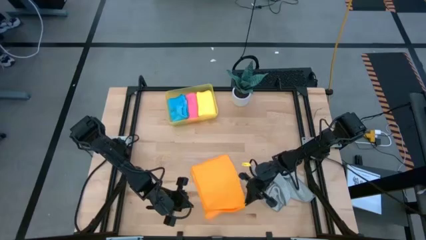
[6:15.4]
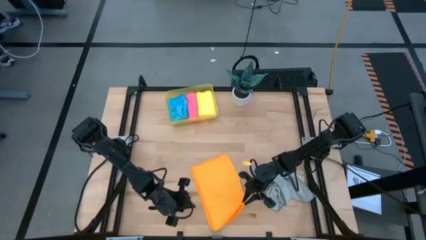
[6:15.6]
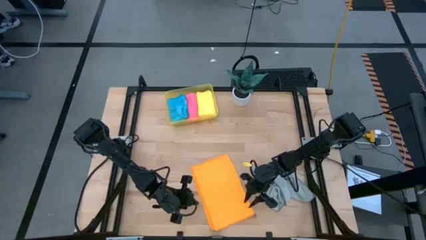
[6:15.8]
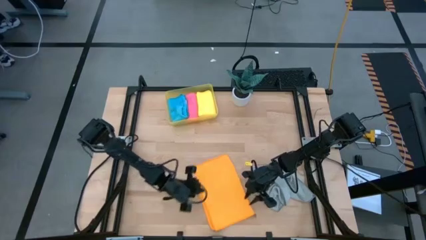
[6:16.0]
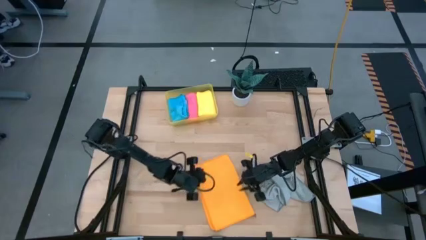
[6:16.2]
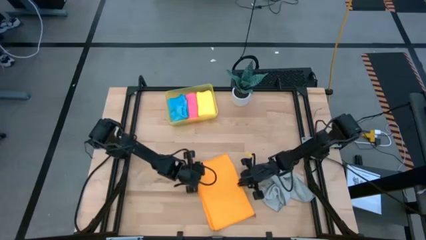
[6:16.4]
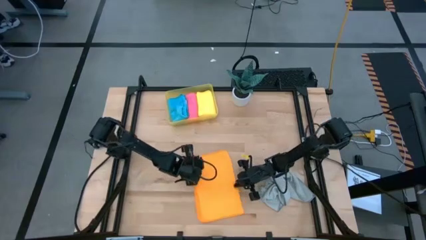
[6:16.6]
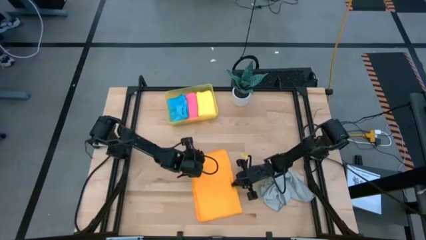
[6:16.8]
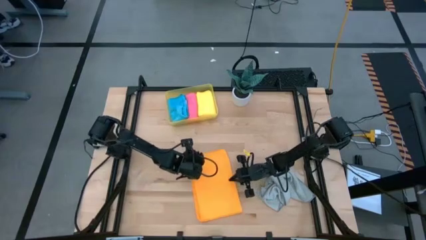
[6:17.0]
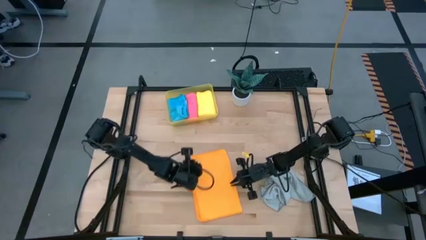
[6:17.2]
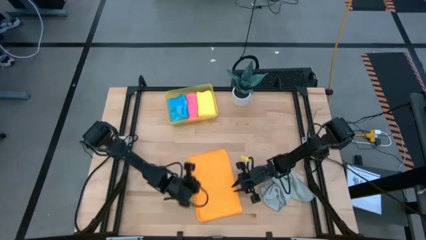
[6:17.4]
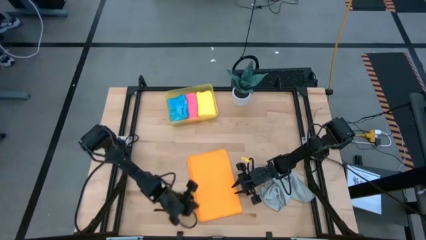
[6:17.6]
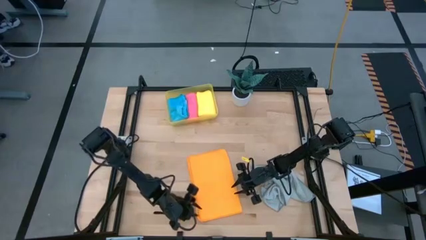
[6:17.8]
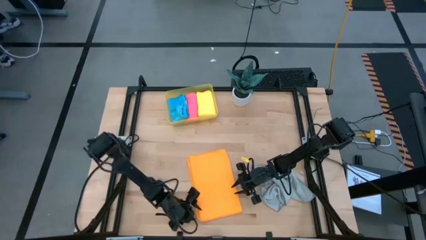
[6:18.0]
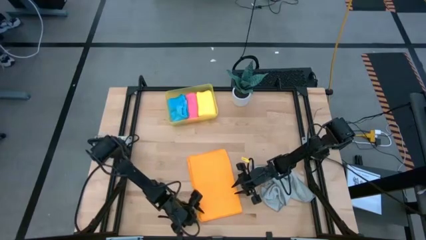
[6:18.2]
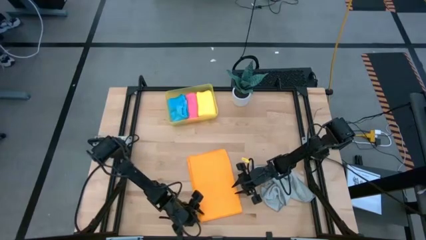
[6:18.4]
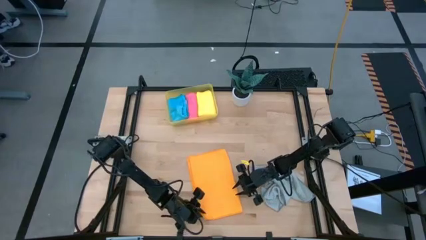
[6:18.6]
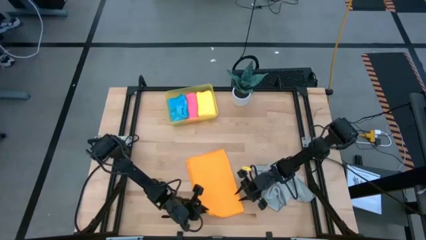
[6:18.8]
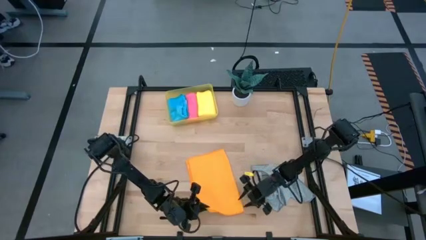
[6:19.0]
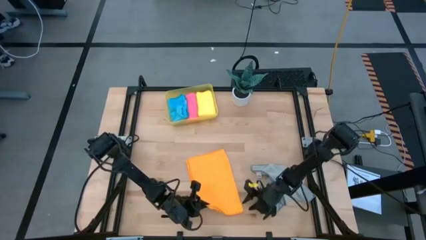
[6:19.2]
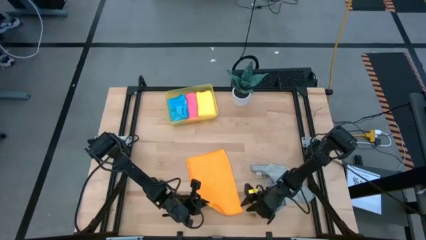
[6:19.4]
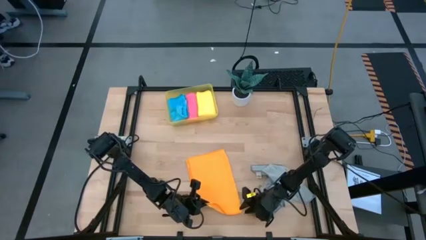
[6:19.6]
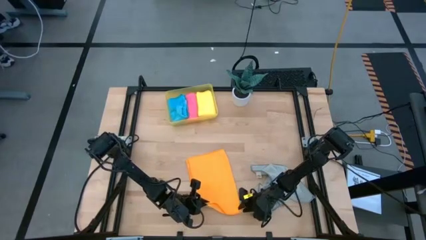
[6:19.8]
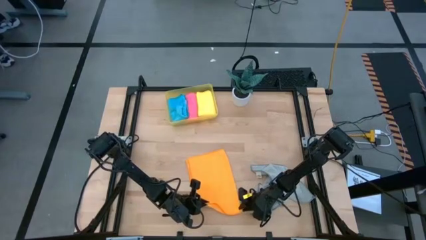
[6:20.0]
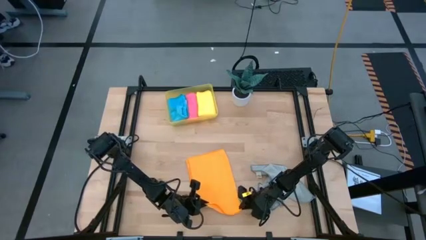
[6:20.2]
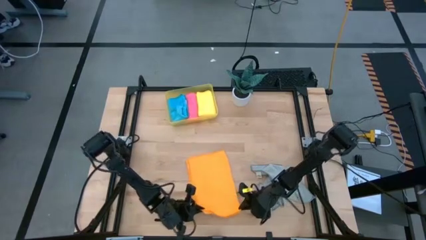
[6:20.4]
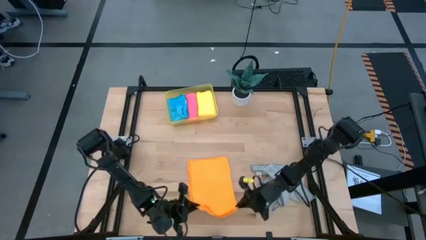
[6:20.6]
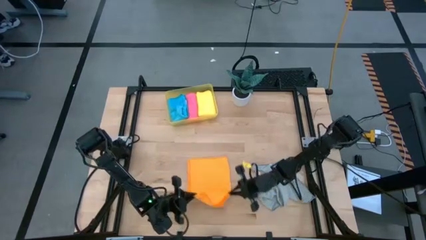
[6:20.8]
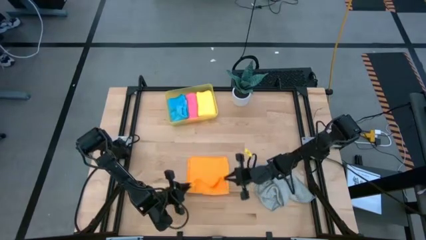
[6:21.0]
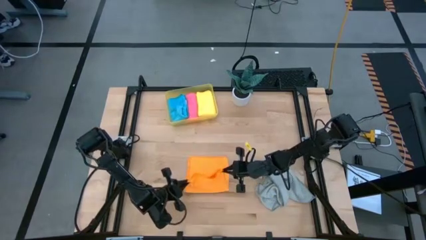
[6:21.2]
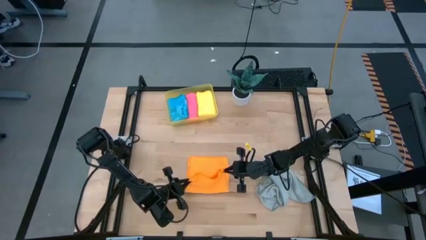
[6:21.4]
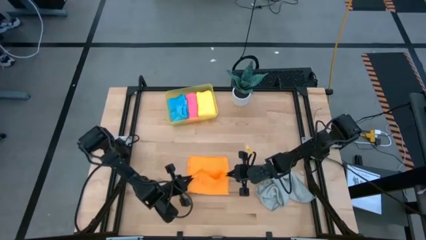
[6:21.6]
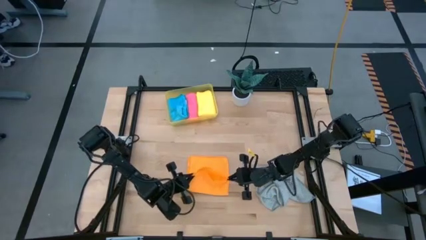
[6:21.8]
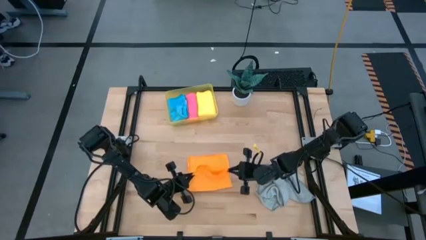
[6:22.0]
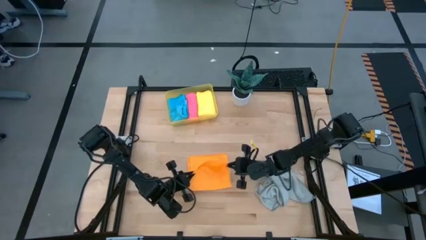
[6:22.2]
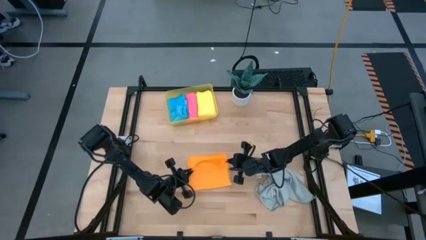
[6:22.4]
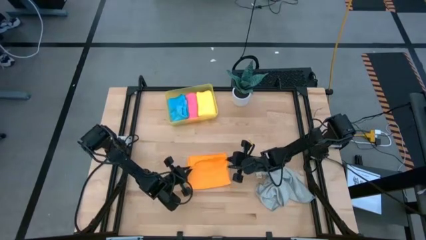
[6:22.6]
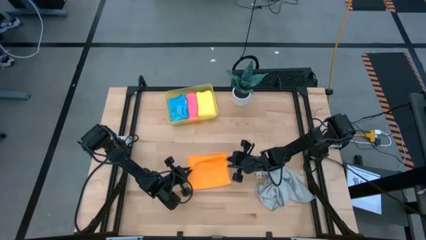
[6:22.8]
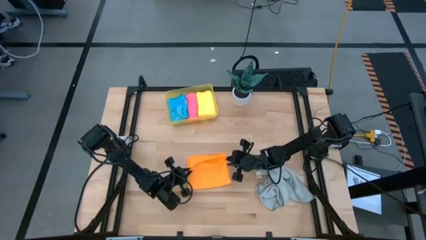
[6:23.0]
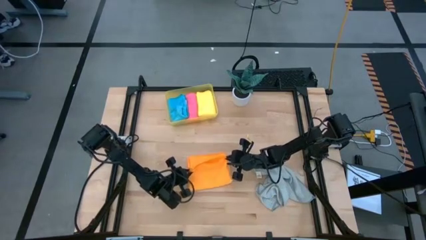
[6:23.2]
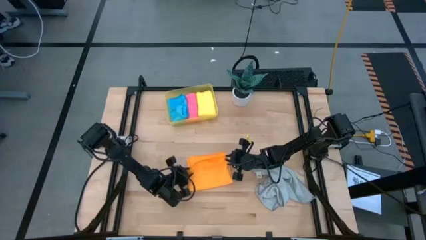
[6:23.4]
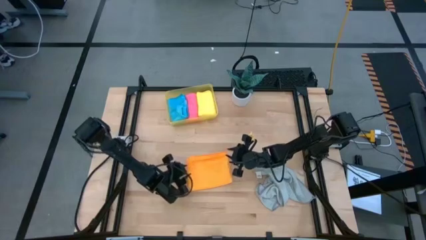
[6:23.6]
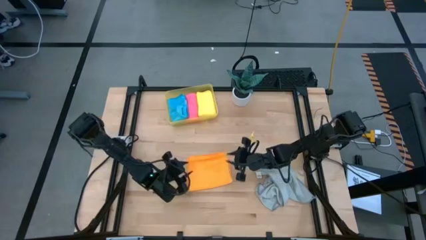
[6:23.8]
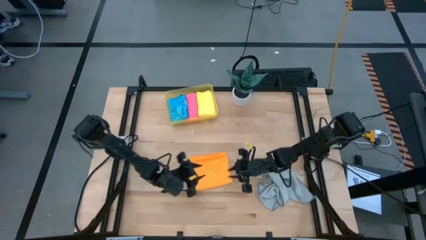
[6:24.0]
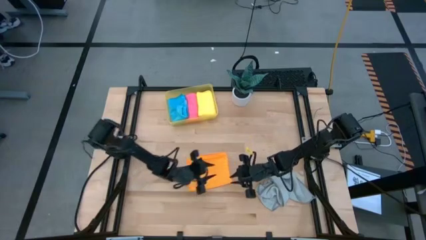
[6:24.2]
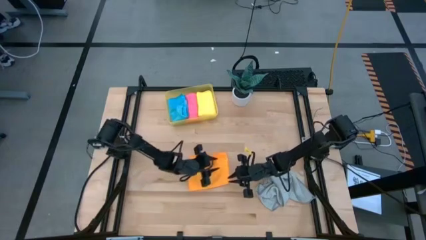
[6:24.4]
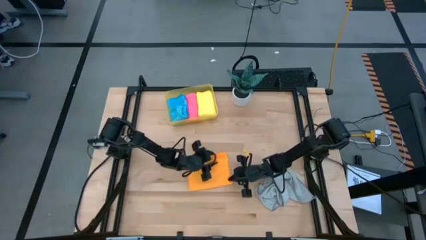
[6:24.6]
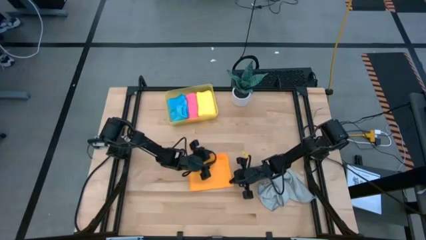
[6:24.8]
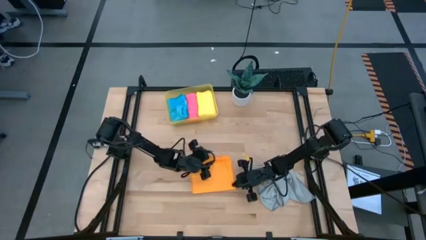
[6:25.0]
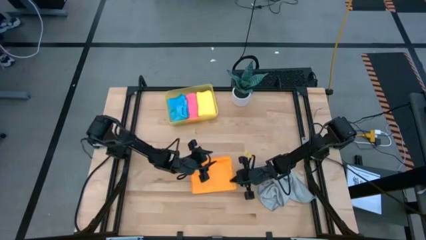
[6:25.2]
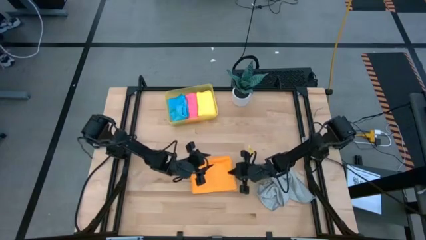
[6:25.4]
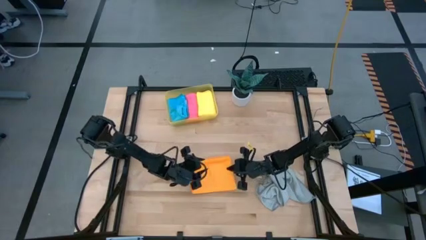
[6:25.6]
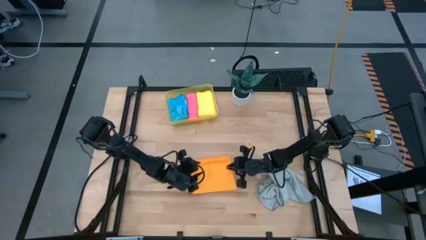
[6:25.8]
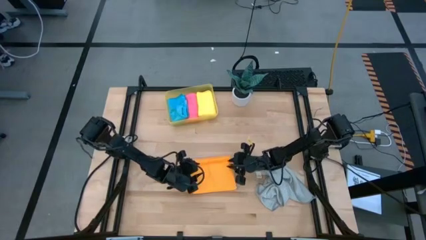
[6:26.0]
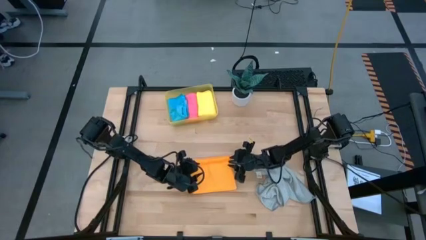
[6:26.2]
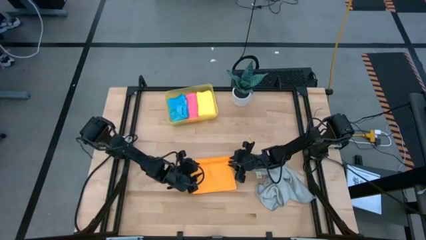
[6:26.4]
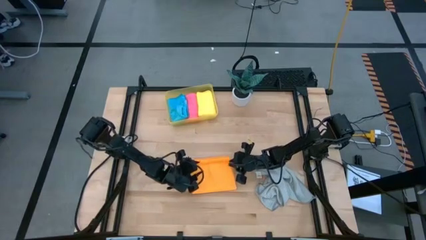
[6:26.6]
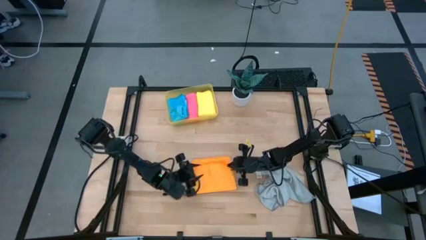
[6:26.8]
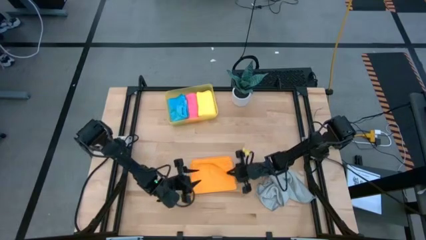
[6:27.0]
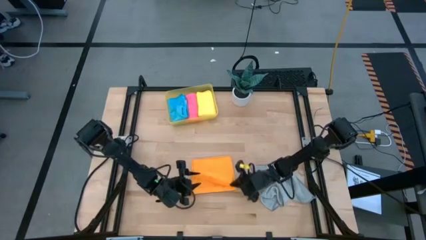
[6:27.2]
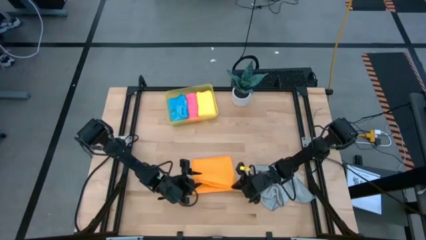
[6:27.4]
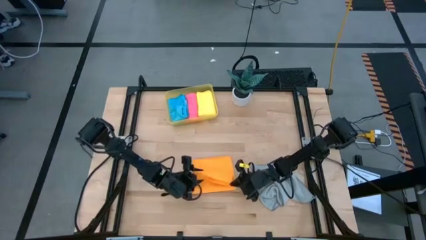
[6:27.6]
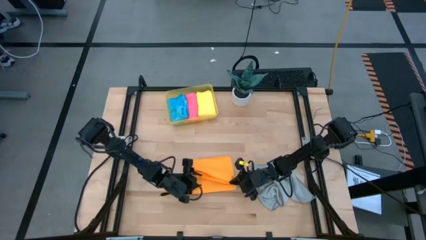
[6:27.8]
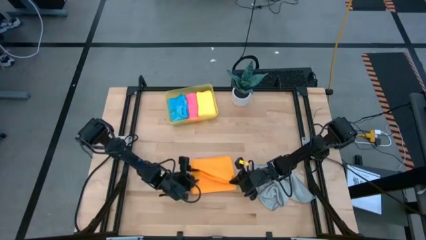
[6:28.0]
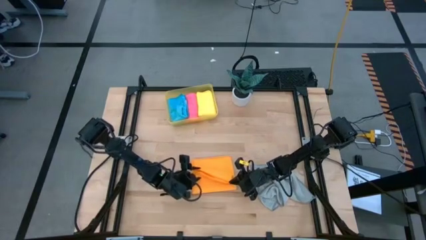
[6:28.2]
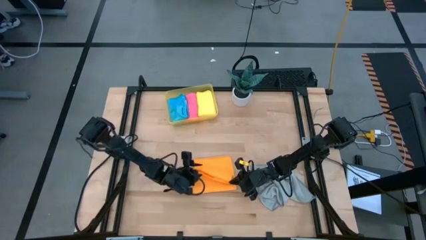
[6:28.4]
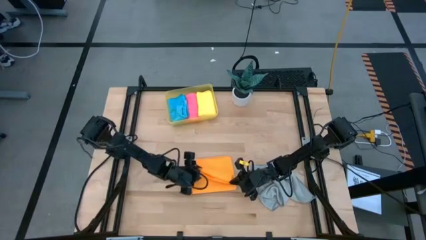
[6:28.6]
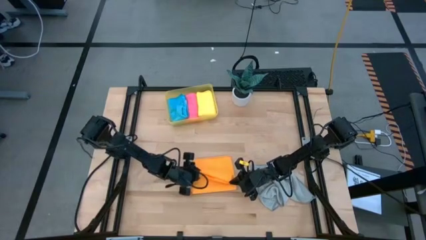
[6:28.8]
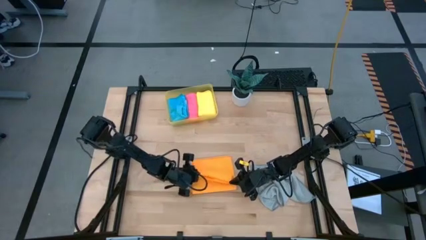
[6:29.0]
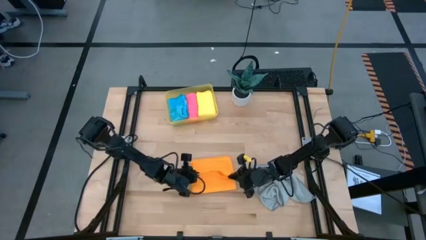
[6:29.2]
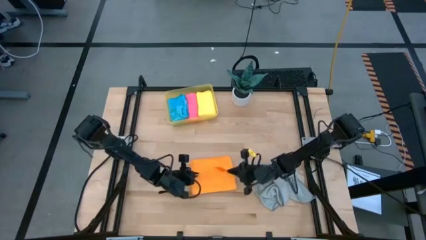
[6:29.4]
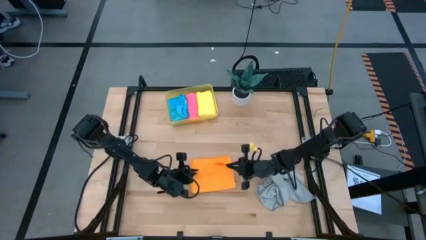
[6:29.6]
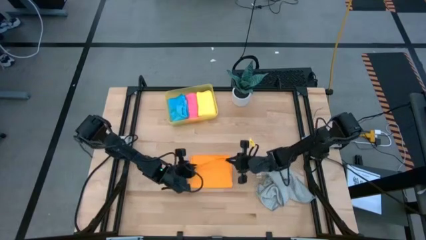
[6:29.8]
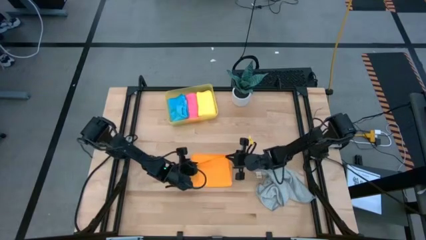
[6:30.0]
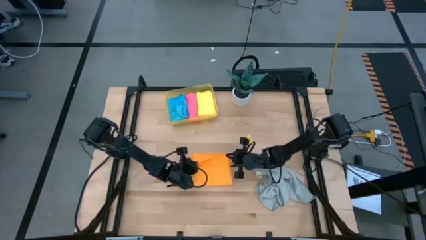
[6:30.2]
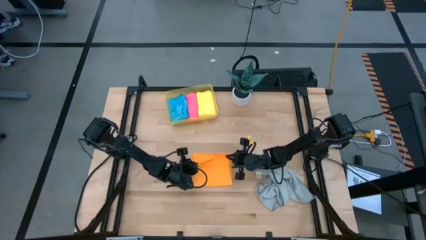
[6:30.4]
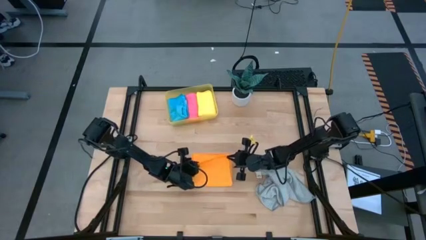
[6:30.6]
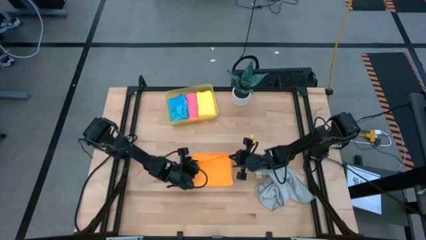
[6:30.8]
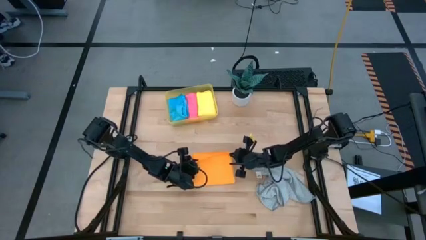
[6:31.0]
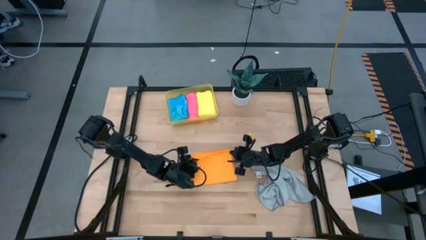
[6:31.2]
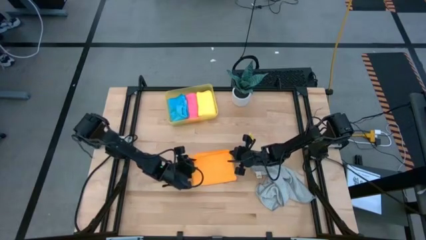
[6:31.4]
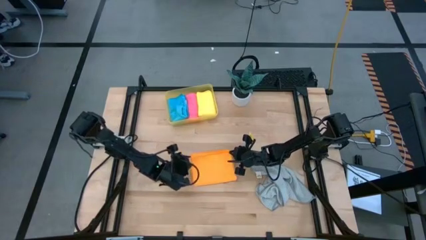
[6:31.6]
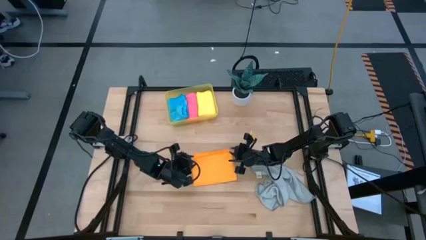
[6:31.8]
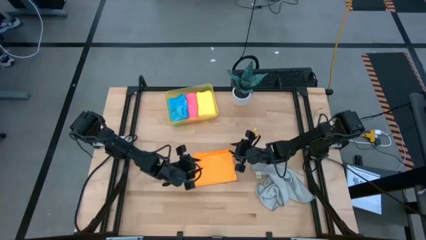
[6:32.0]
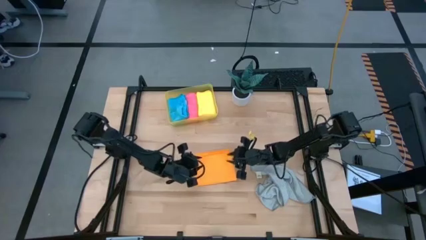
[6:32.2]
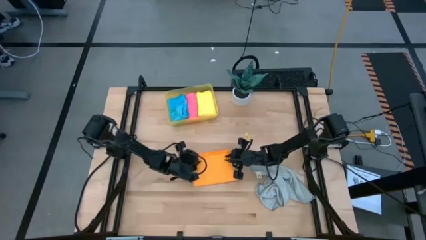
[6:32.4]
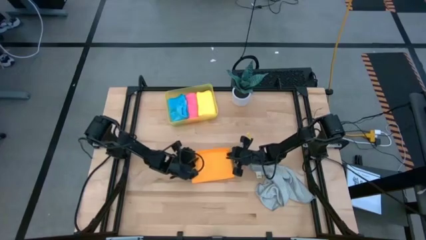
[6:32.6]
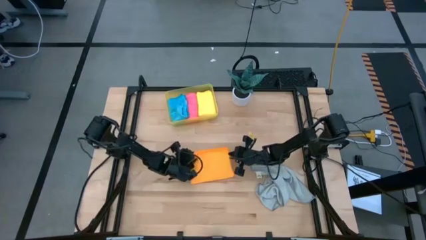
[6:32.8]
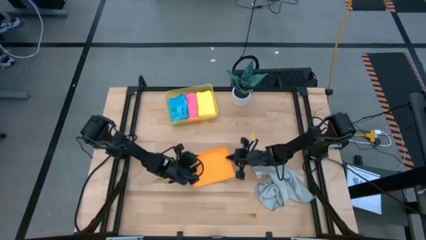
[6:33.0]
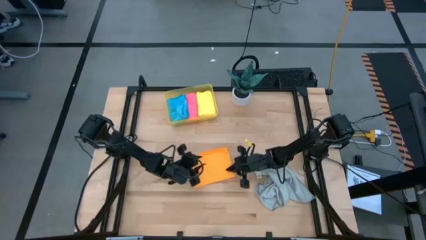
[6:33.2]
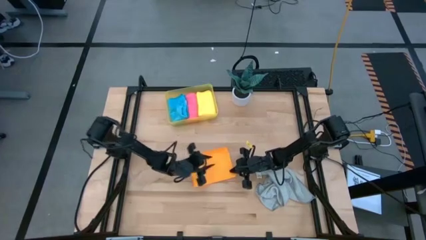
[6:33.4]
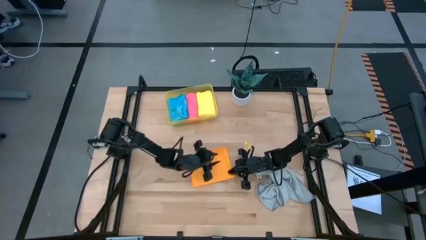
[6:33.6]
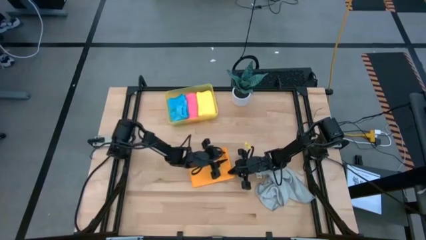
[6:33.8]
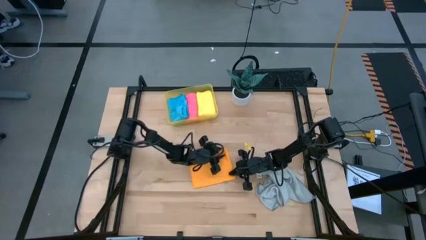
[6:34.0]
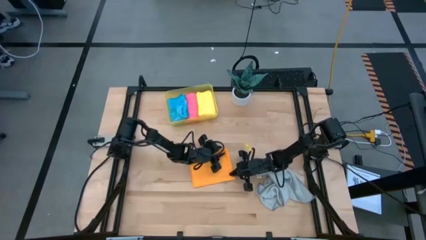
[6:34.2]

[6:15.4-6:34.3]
Task: Fold microfiber towels
Fold the orange microfiber cloth
